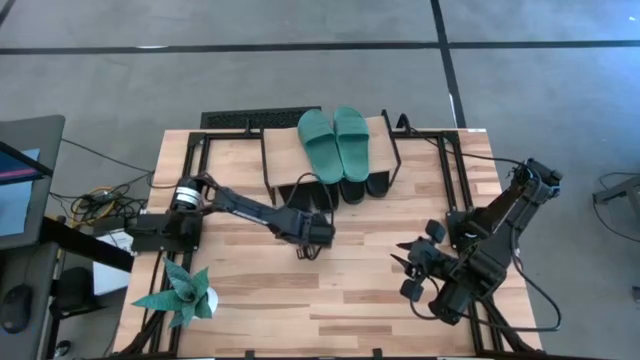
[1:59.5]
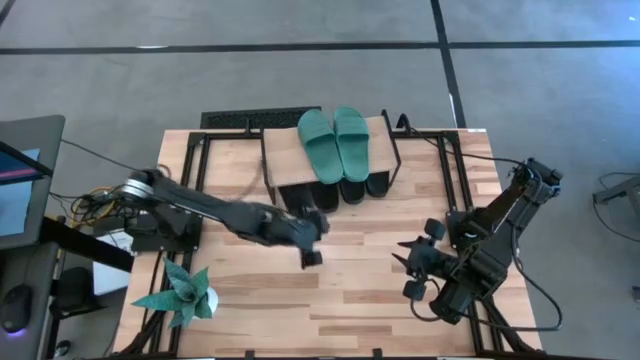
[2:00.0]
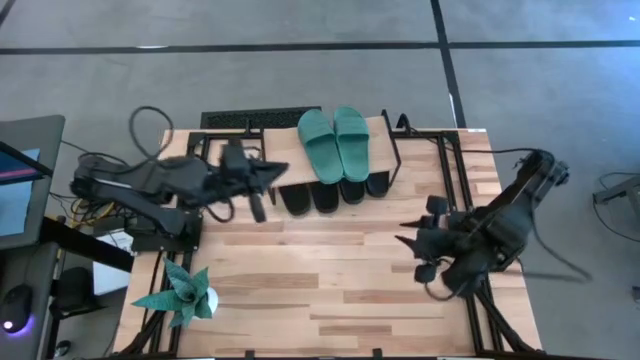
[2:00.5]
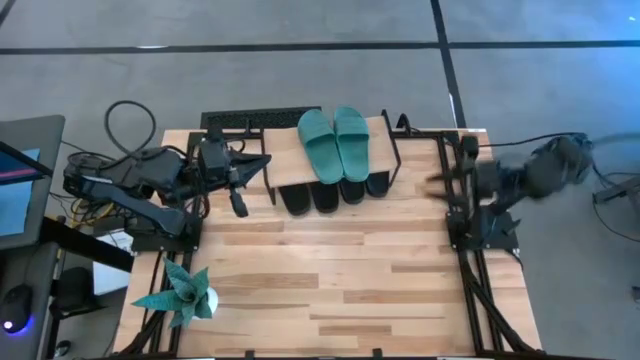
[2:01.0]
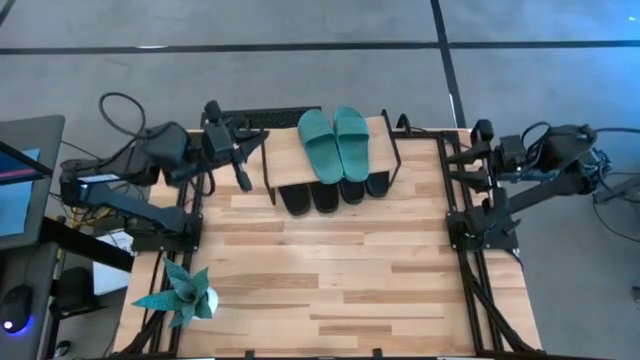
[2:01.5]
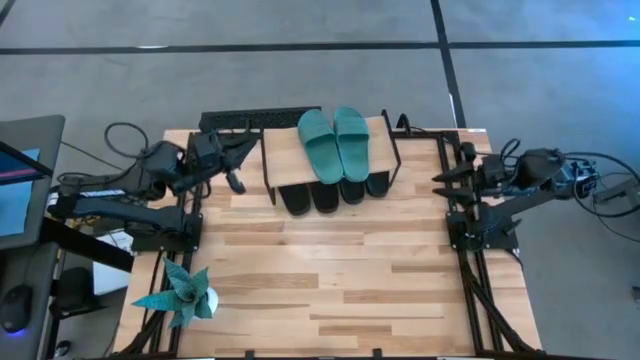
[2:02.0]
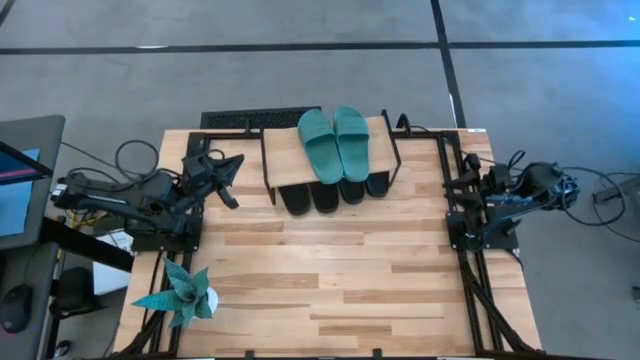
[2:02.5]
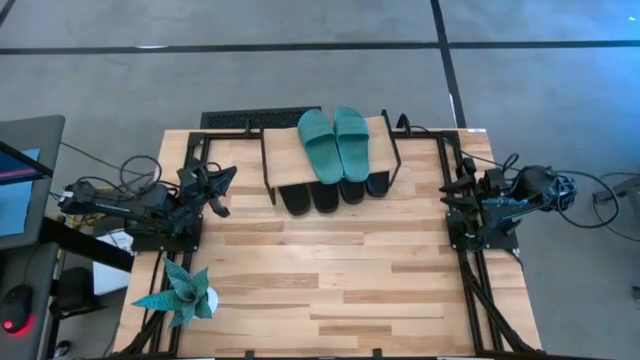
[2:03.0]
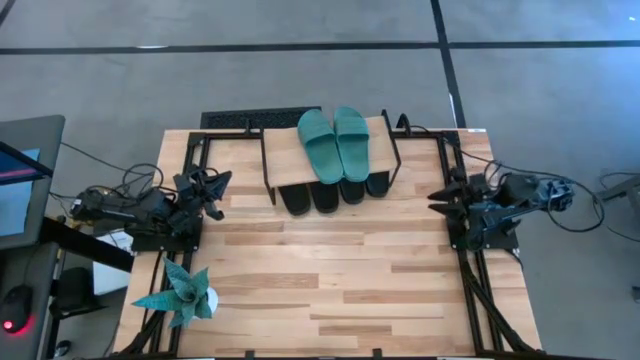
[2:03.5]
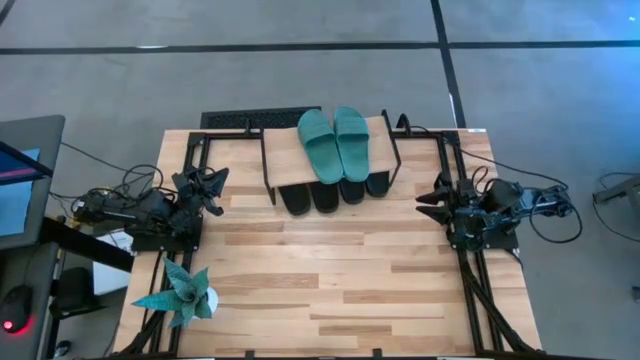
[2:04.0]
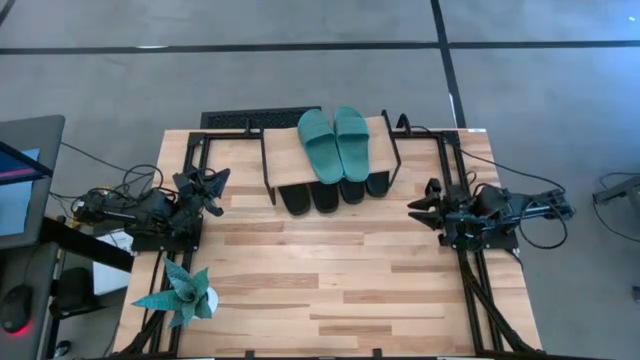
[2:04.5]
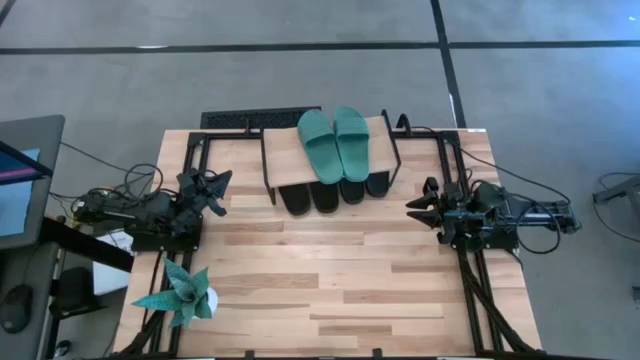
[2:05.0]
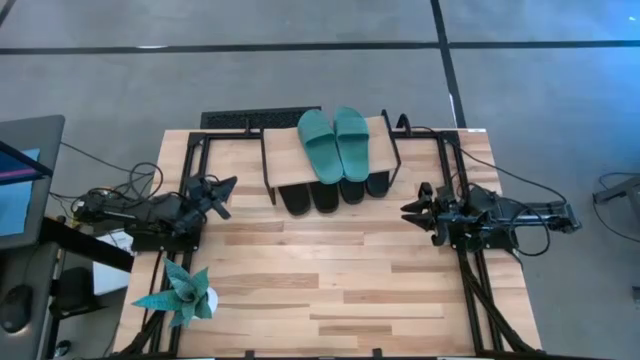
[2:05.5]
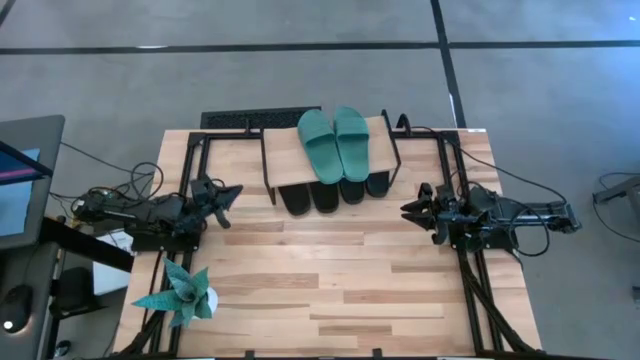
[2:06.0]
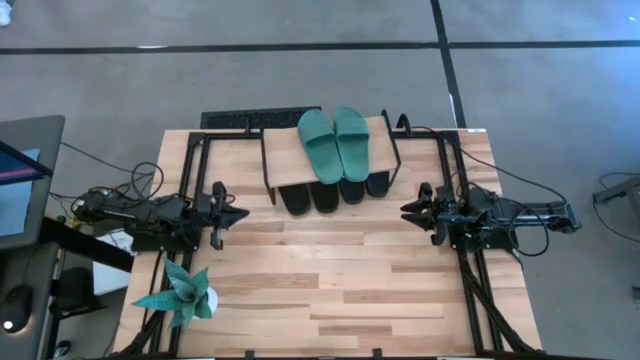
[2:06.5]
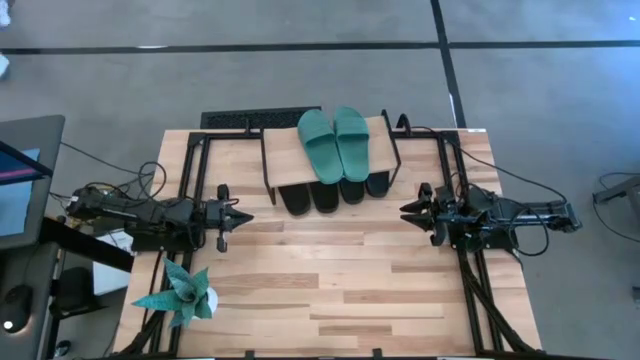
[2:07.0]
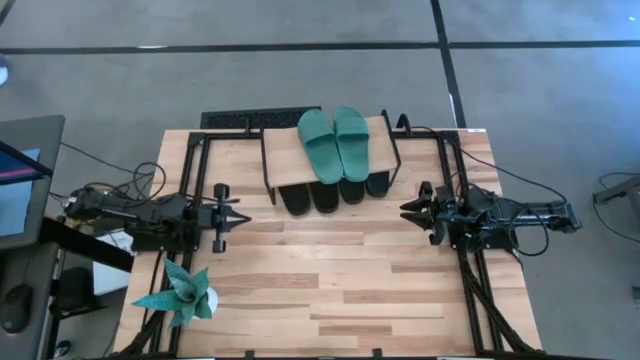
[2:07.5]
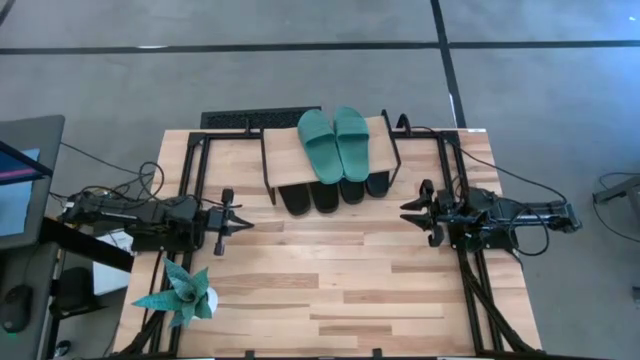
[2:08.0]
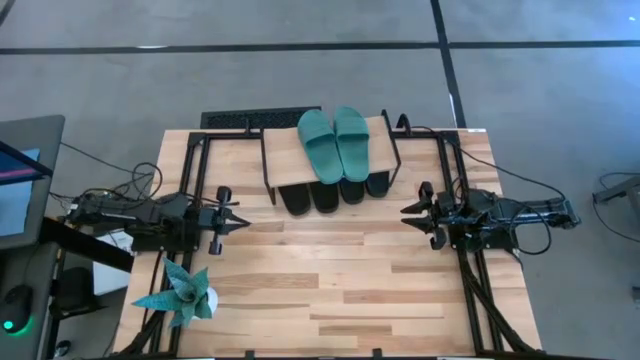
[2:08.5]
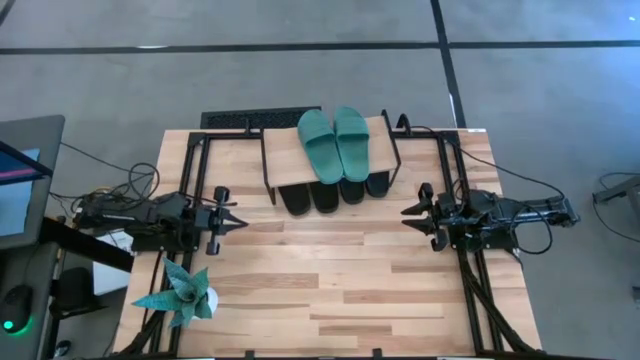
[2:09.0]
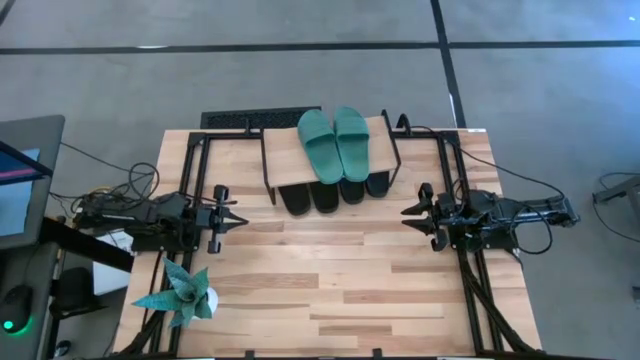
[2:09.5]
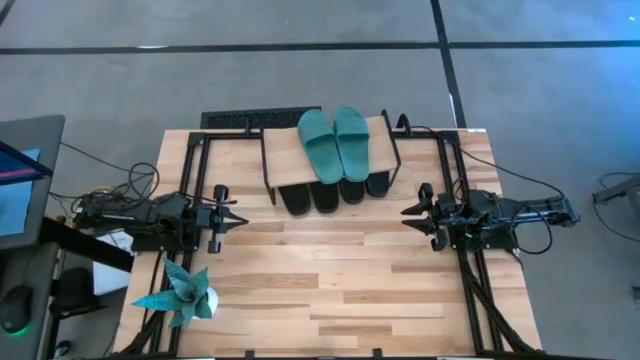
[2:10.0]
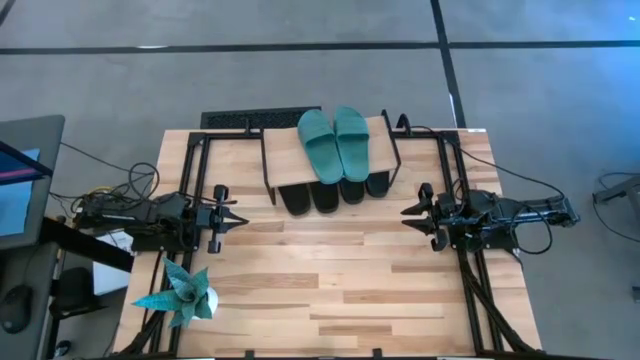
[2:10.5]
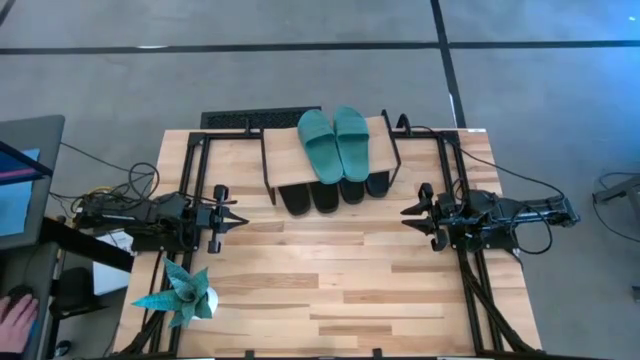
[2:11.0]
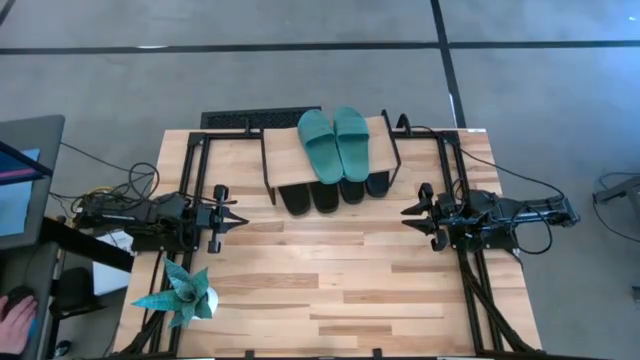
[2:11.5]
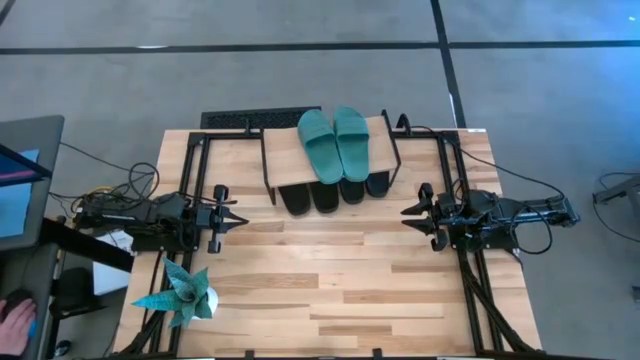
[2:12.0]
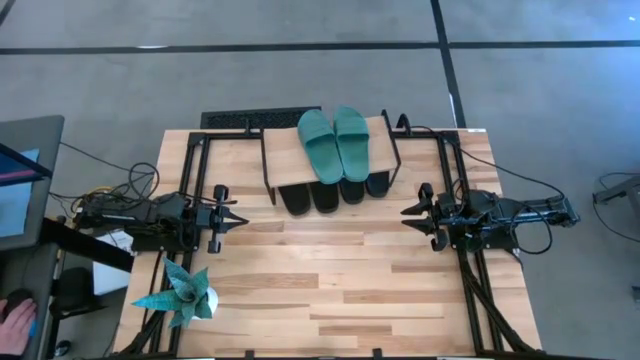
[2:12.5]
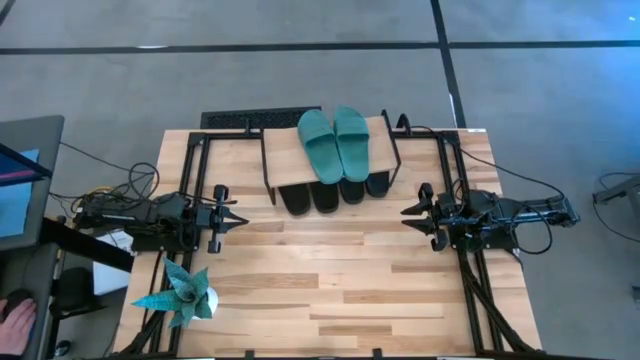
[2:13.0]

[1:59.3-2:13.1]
Task: Pick and place slides into the shelf
Return to Home Position

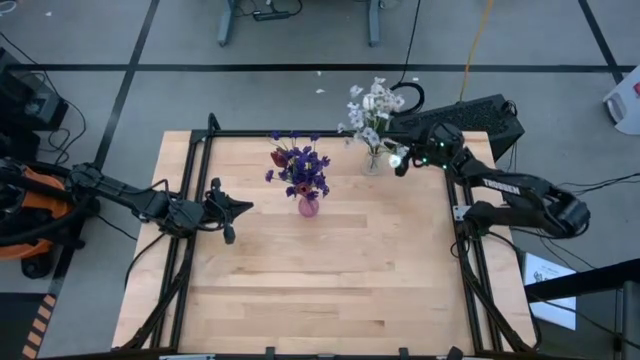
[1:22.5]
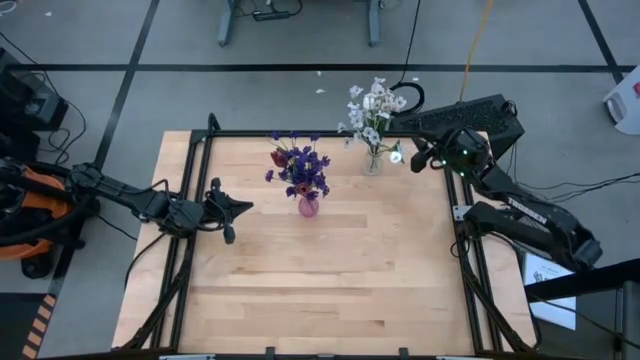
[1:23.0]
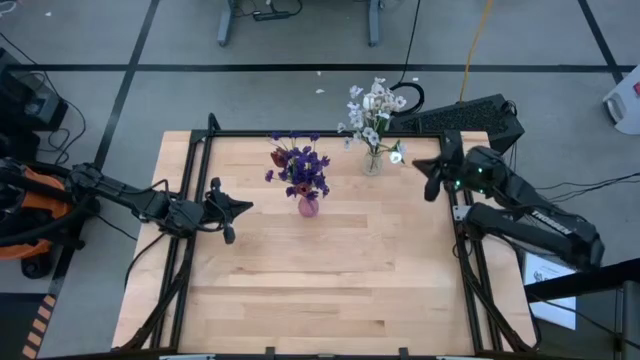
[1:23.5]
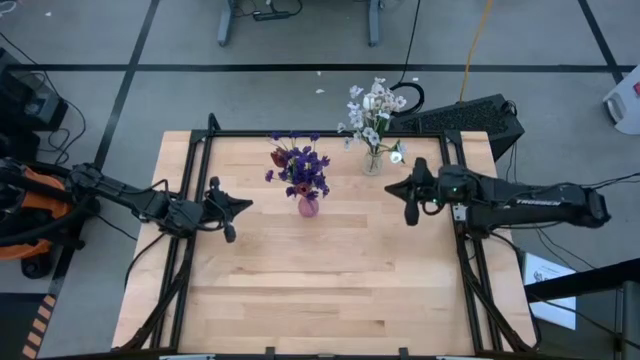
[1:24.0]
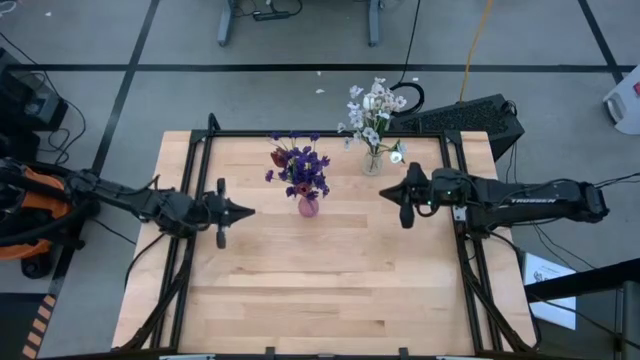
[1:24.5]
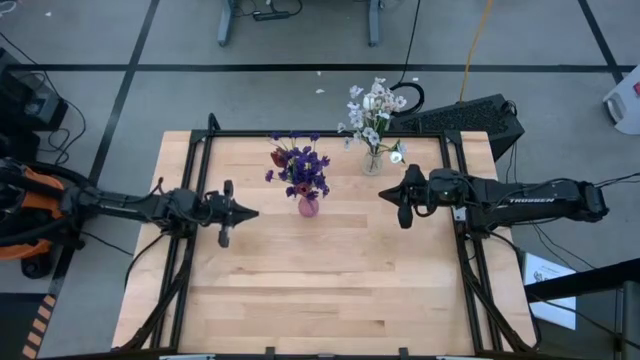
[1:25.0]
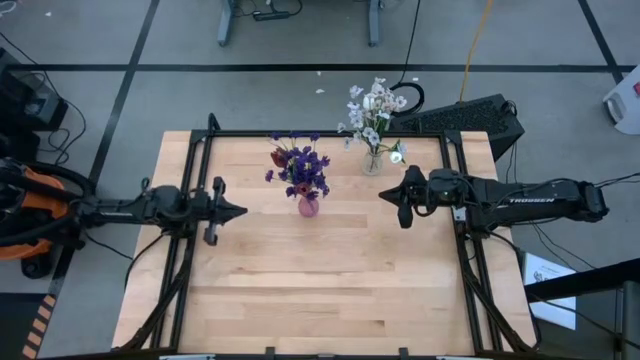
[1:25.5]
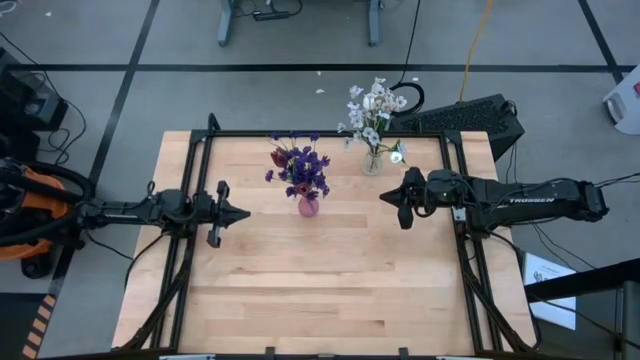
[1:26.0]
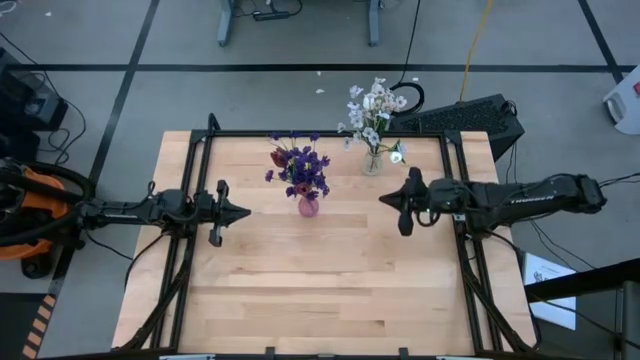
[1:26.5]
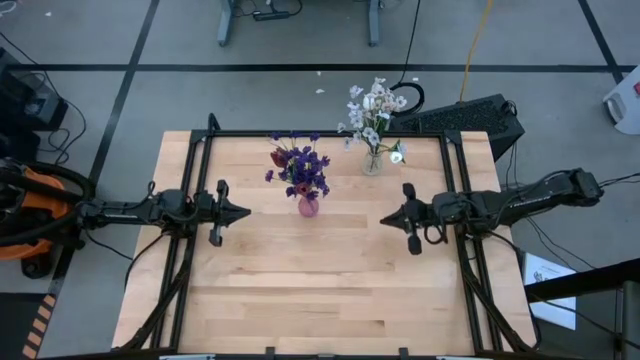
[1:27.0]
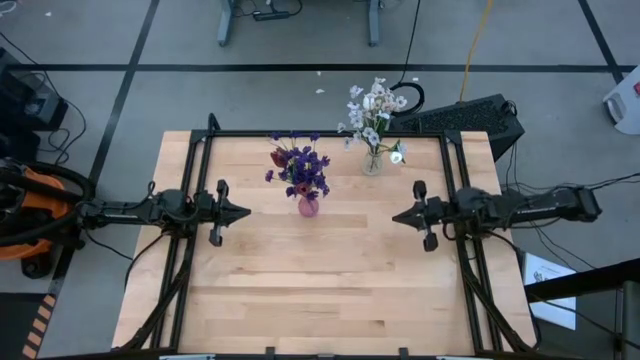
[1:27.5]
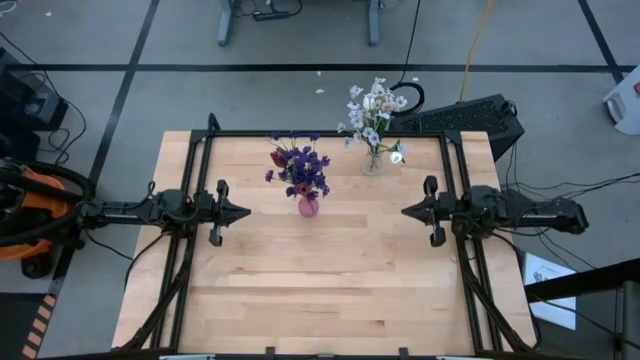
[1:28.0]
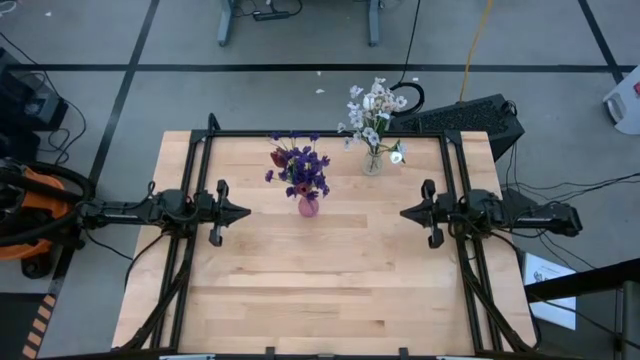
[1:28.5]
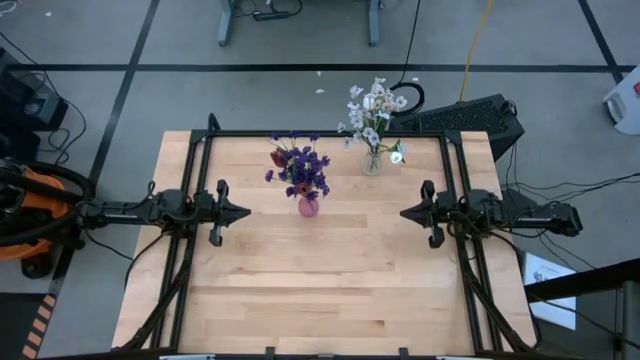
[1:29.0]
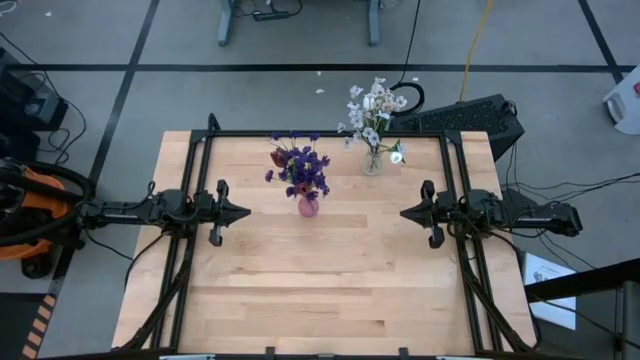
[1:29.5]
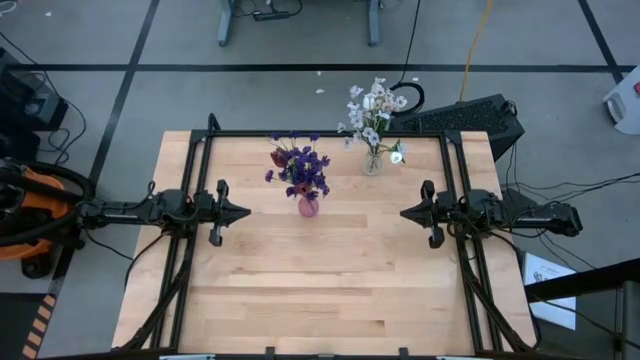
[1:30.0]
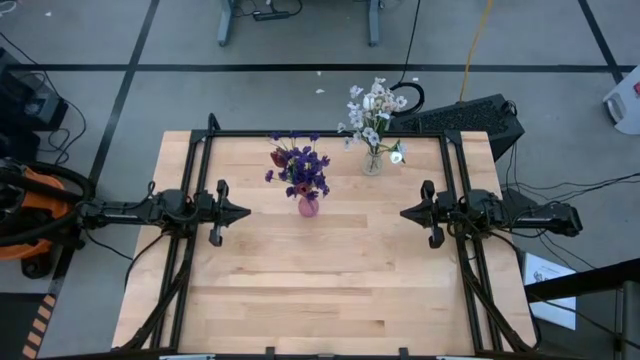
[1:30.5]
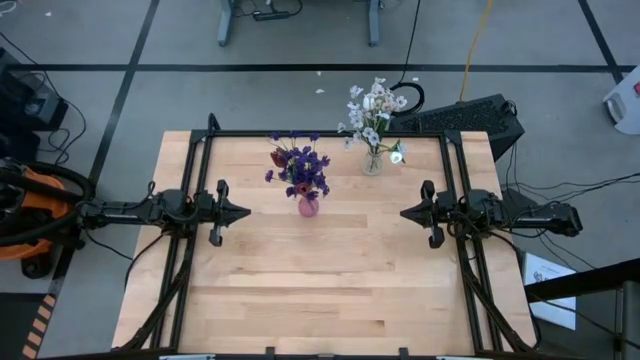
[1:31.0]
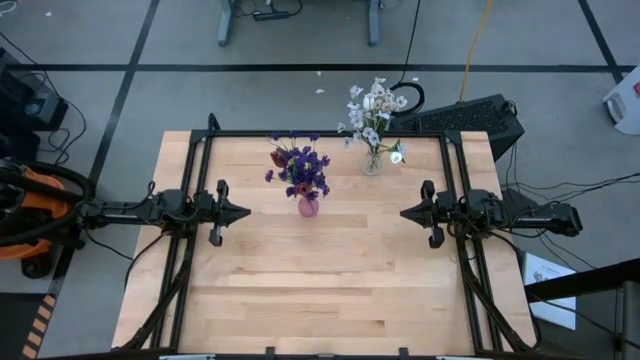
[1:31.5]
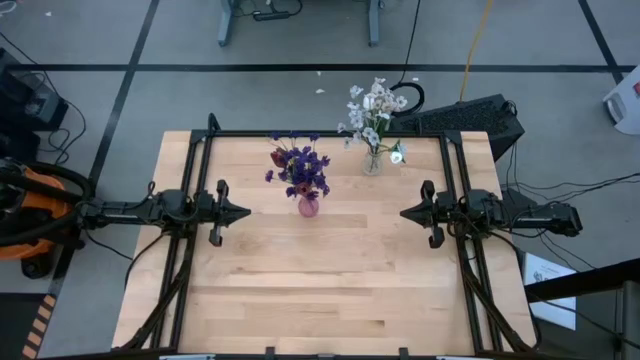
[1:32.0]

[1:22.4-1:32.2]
Task: Sort flowers into vase by color
Return to Home Position
